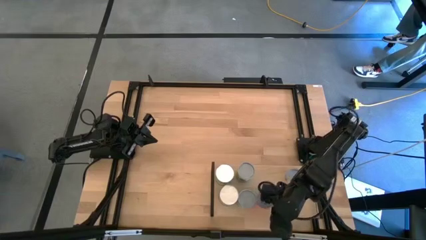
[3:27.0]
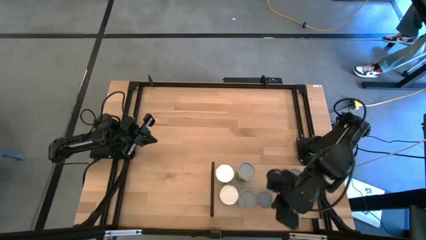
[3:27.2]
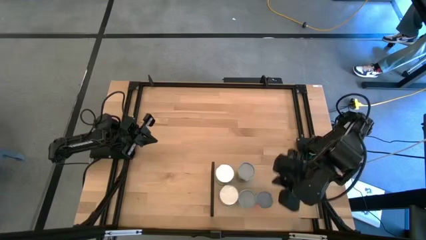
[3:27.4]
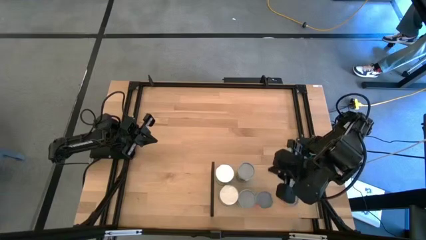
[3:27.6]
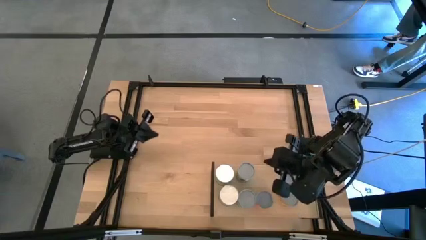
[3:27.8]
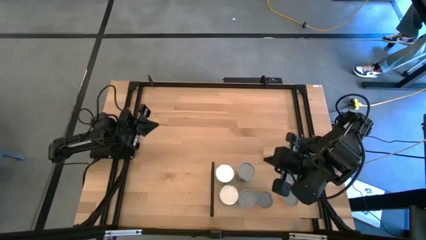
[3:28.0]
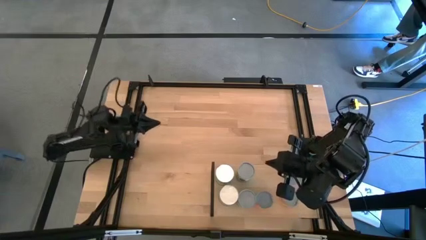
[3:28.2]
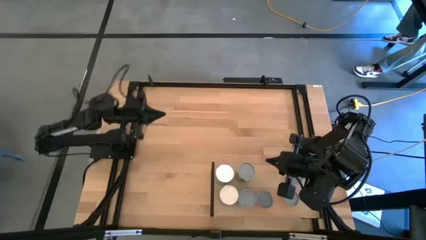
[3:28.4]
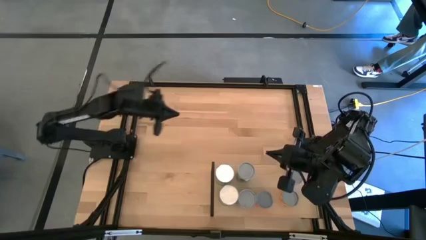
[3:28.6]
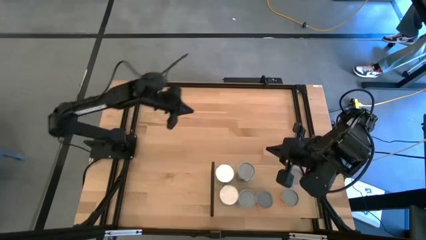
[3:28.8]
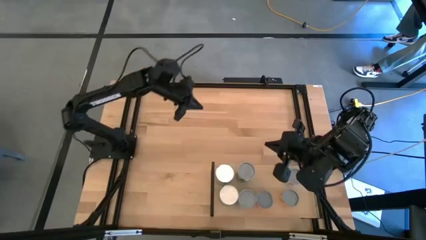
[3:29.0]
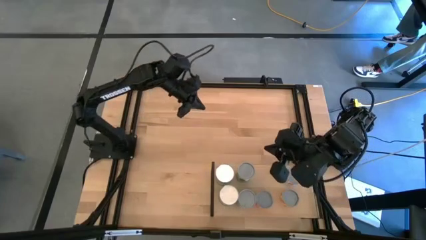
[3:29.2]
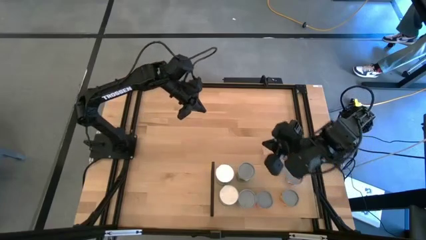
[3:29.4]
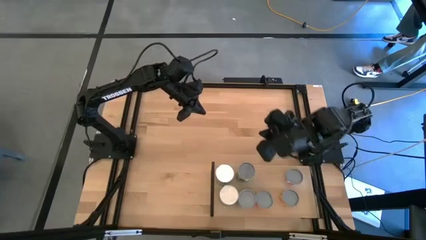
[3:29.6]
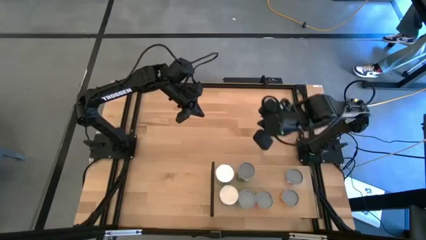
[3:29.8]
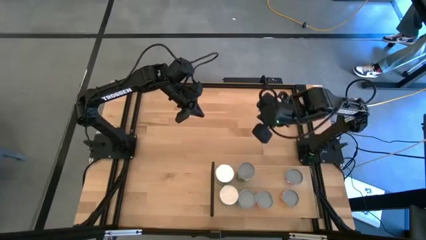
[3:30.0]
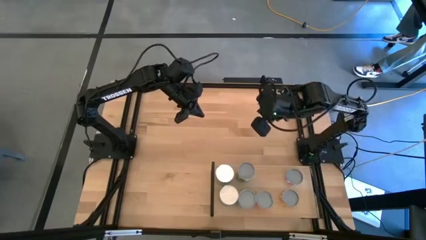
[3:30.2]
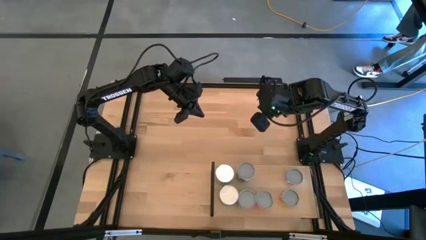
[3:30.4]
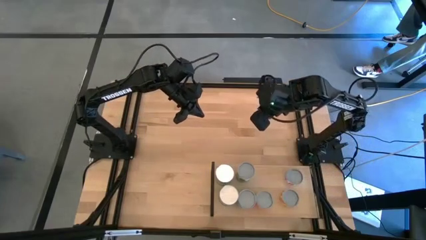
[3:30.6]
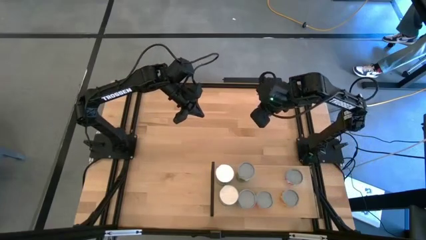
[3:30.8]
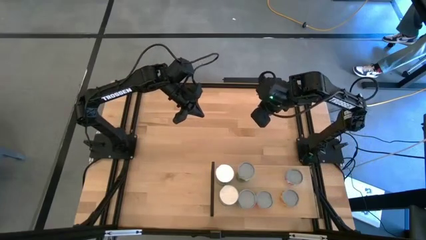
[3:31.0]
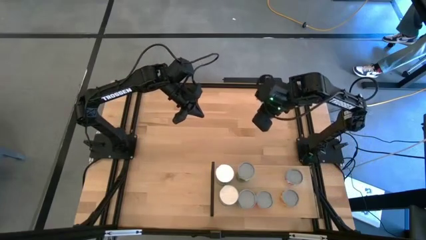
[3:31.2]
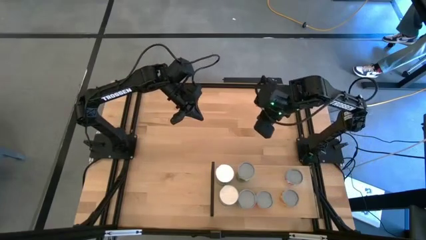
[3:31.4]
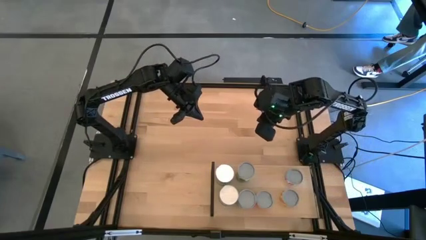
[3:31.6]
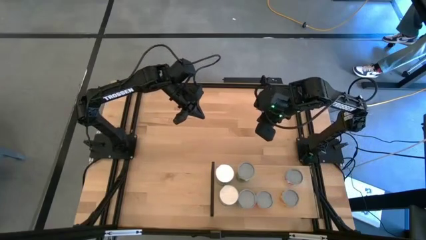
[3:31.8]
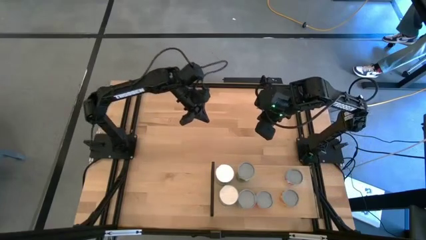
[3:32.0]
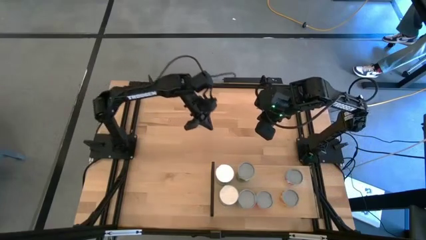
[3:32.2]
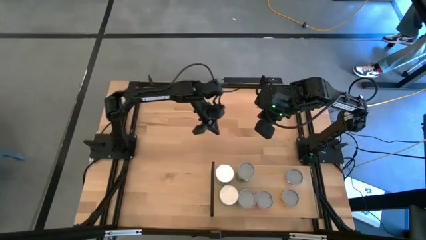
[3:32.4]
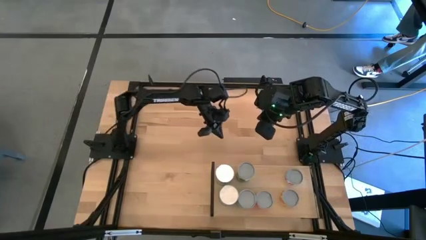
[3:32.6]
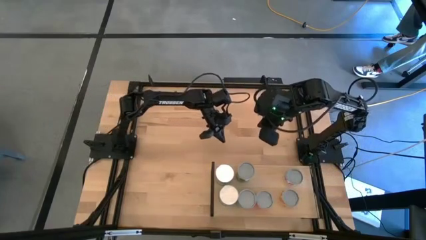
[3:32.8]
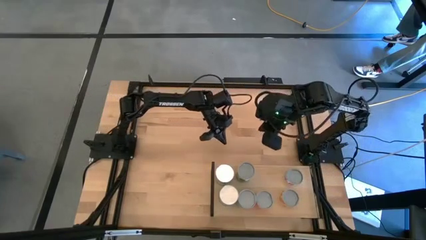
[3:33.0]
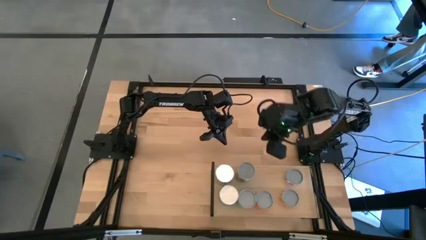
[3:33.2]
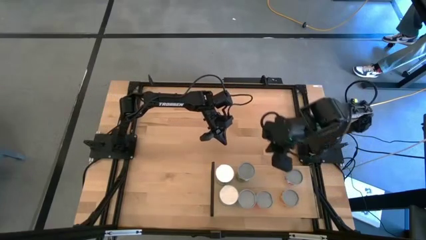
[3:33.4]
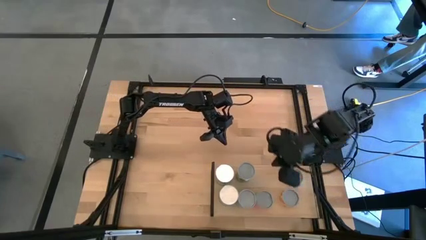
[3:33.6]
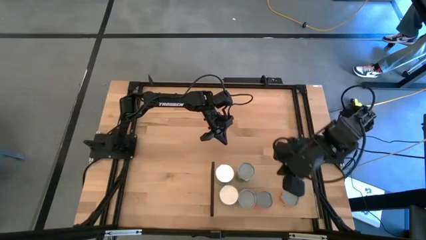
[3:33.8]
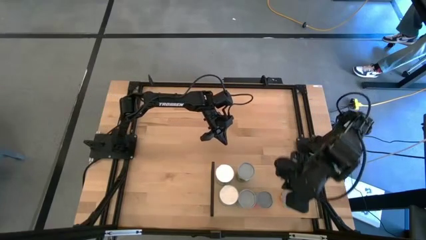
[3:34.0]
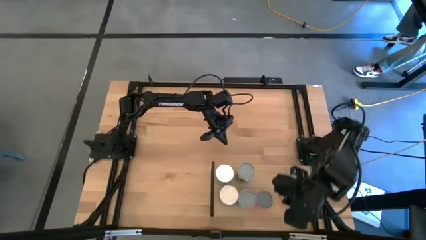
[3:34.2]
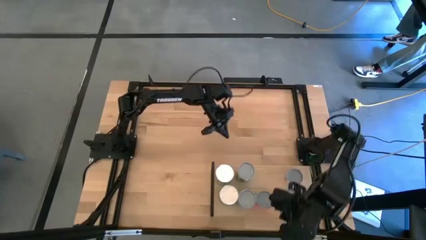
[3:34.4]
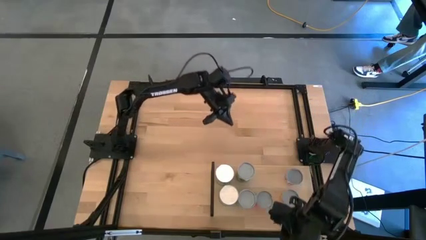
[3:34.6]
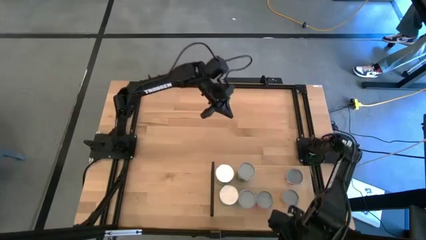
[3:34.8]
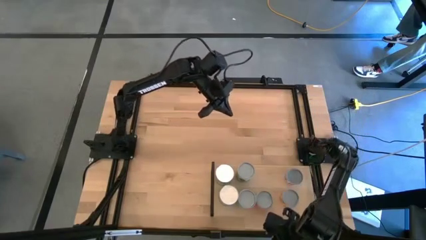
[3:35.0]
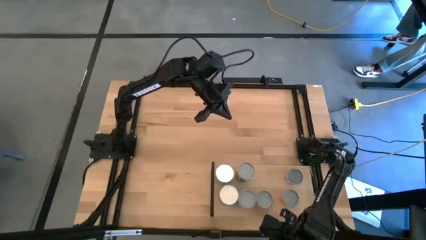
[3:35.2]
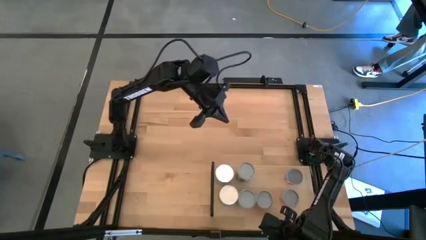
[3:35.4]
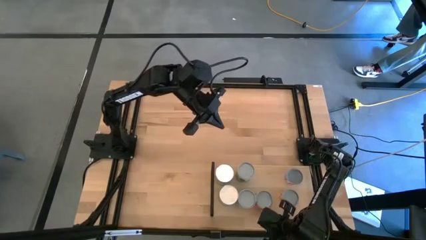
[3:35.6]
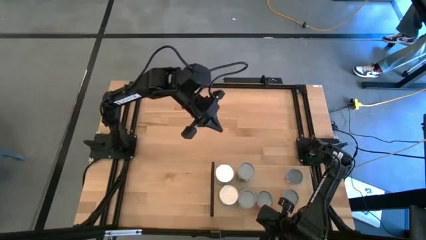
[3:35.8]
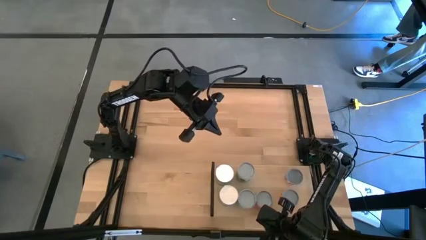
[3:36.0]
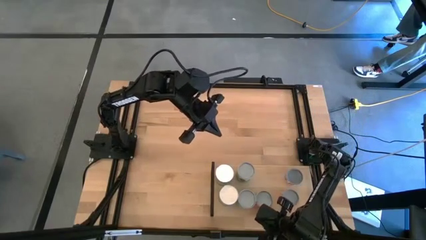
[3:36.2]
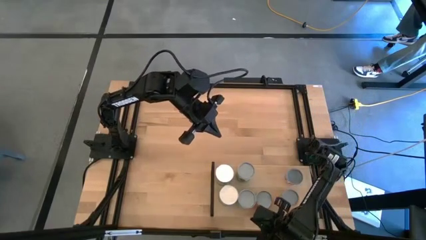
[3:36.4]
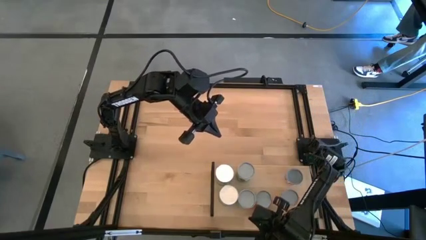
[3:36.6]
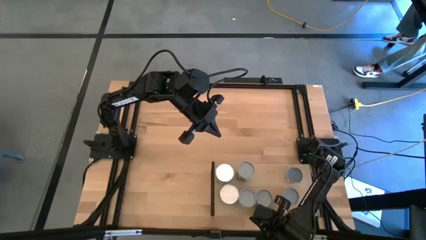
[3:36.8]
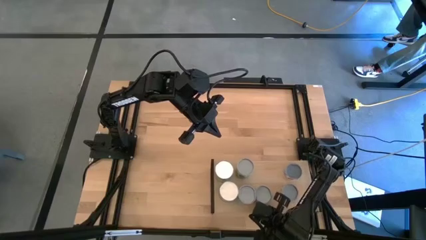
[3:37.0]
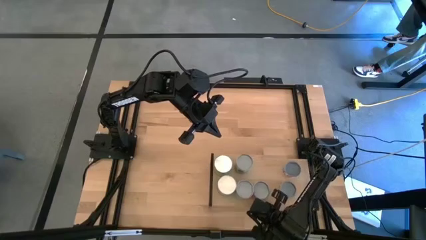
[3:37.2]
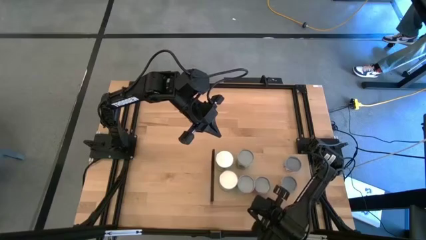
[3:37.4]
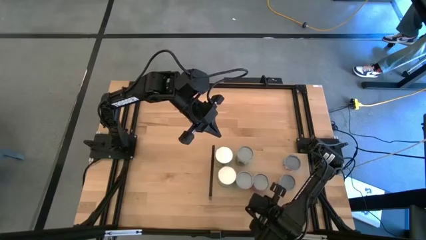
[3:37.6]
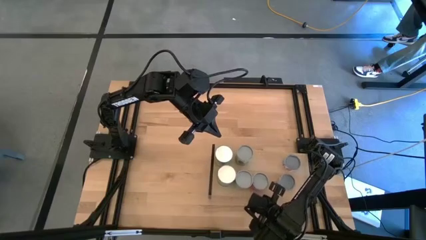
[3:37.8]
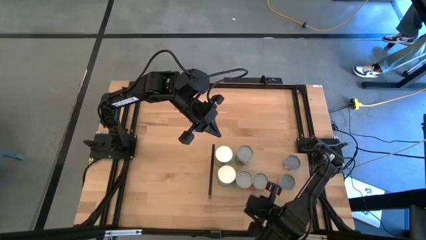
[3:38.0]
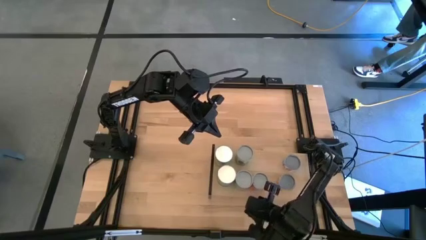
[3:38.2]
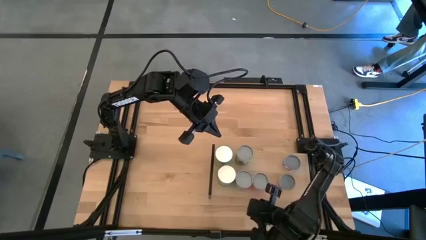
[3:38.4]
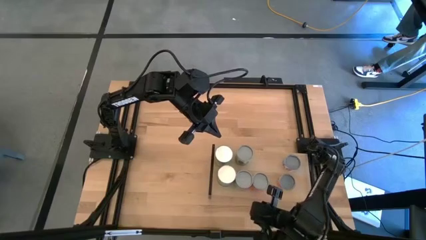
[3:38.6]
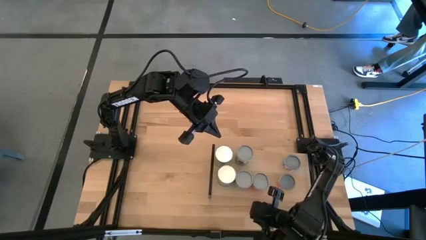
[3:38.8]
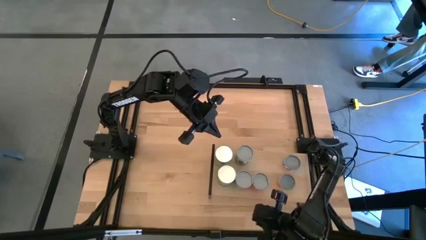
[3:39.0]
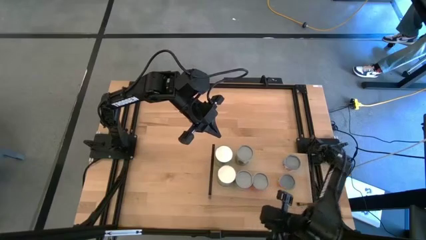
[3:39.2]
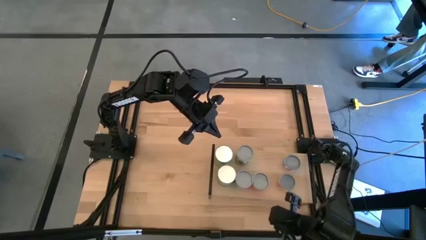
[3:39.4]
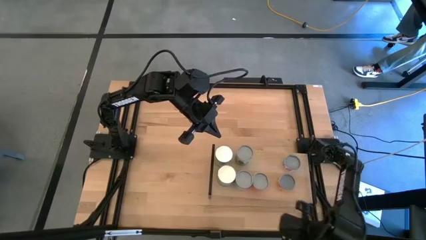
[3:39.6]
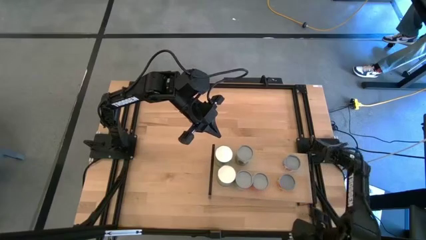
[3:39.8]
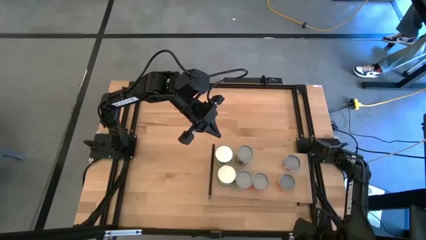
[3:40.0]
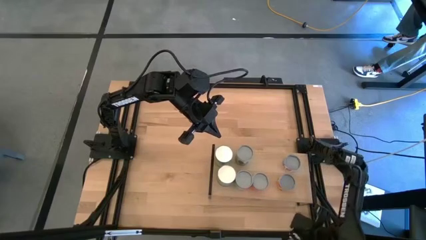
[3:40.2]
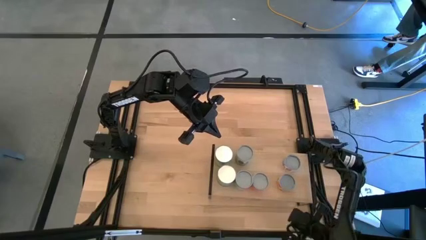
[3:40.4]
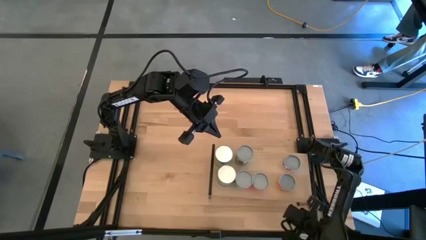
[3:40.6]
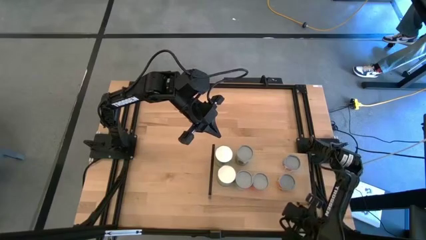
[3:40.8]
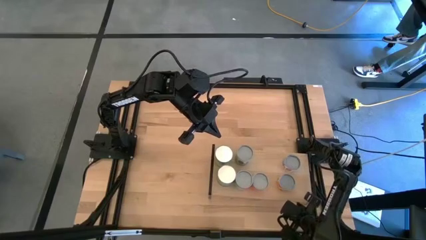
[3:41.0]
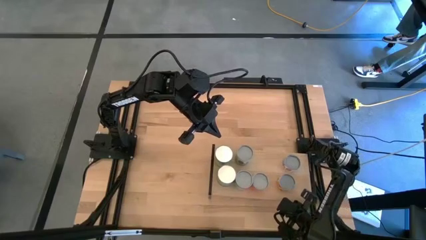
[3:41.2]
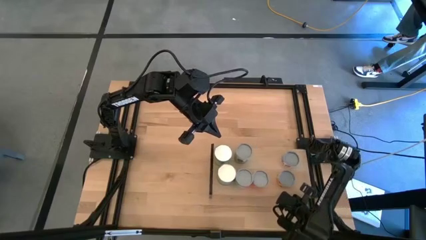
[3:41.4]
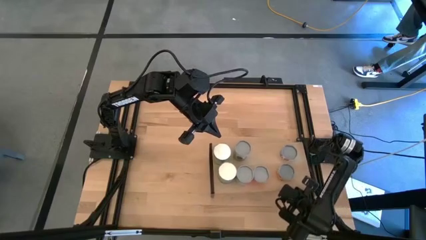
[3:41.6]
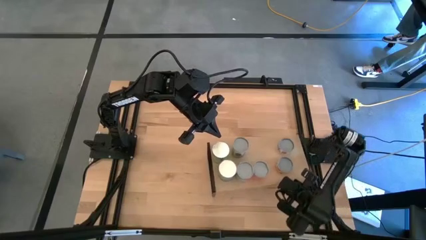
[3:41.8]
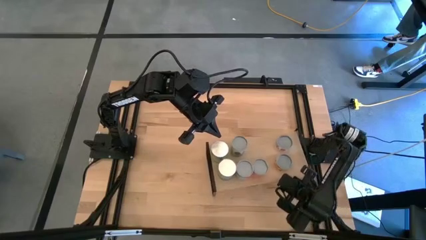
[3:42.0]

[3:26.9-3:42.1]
Task: Pick and place cans onto a shelf
Adjust the shelf
